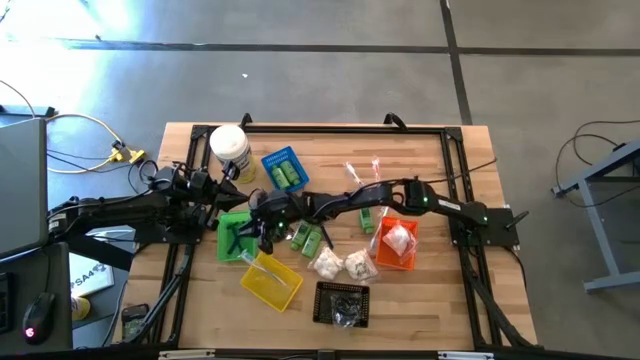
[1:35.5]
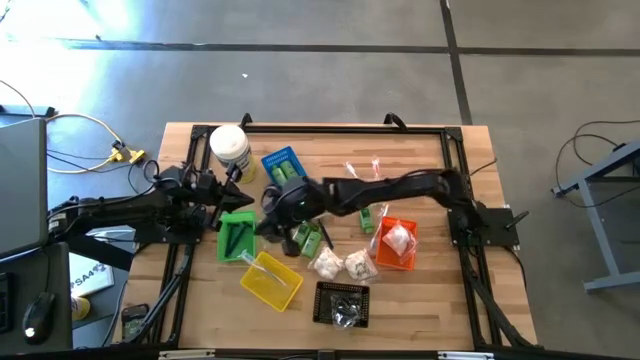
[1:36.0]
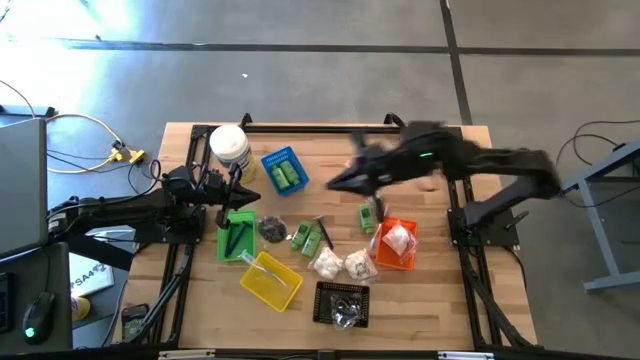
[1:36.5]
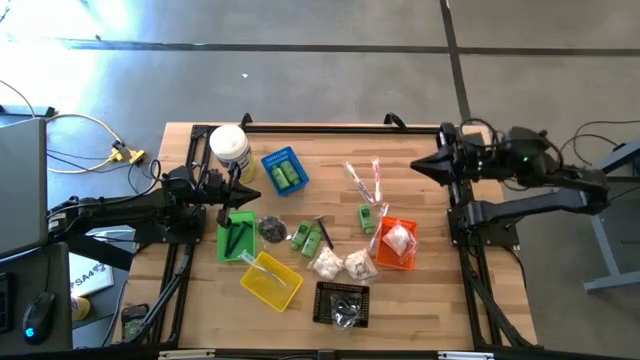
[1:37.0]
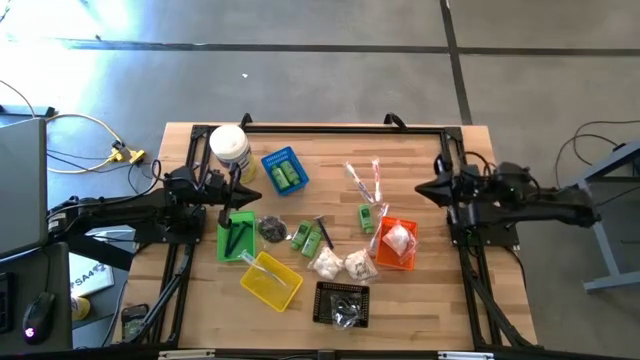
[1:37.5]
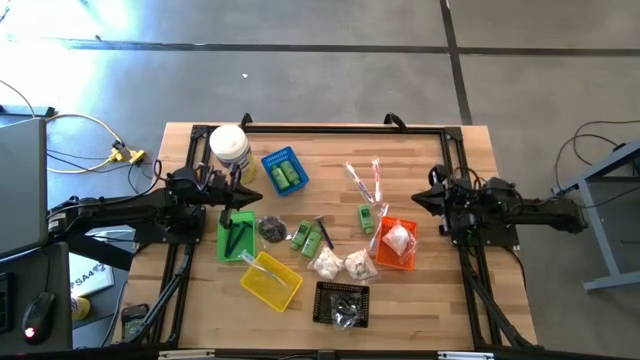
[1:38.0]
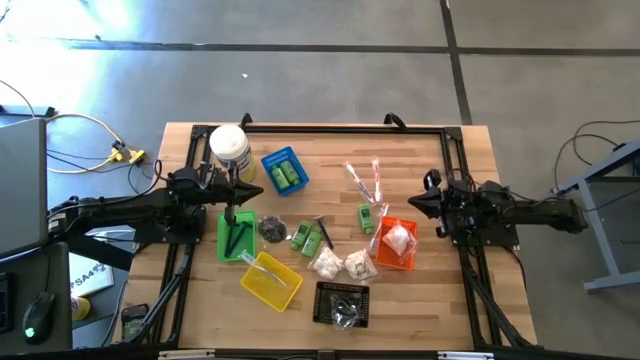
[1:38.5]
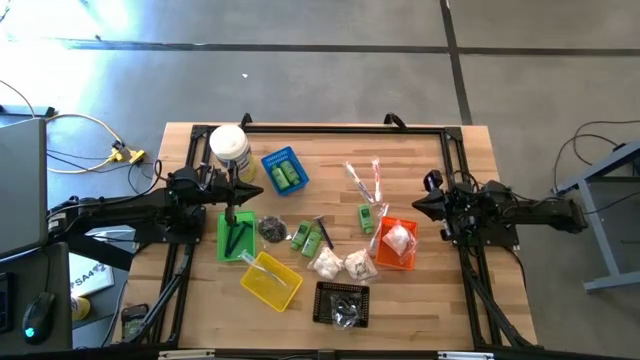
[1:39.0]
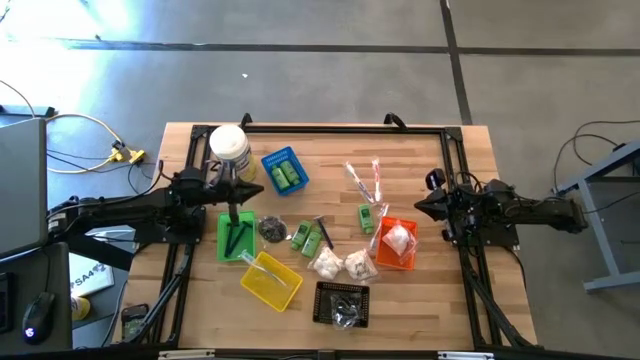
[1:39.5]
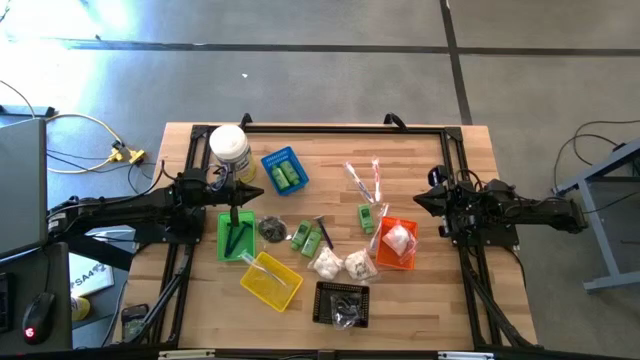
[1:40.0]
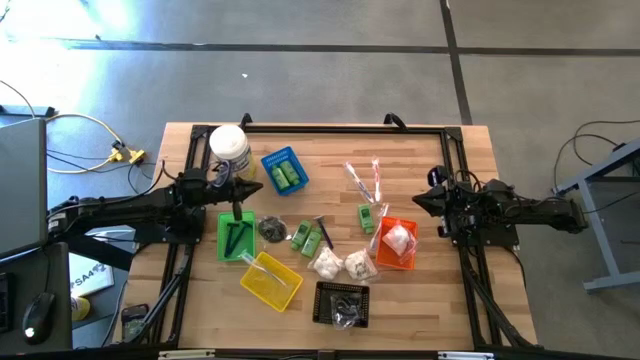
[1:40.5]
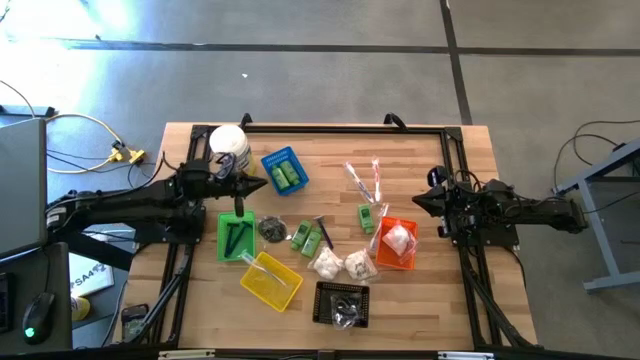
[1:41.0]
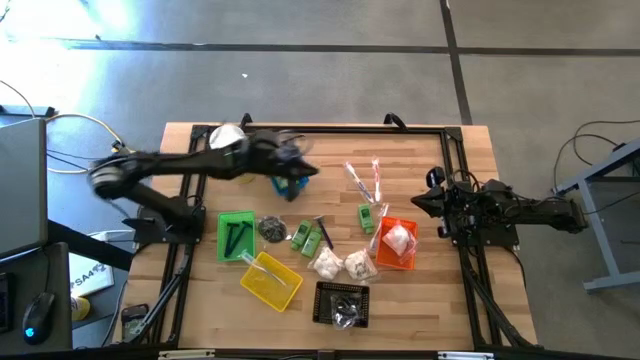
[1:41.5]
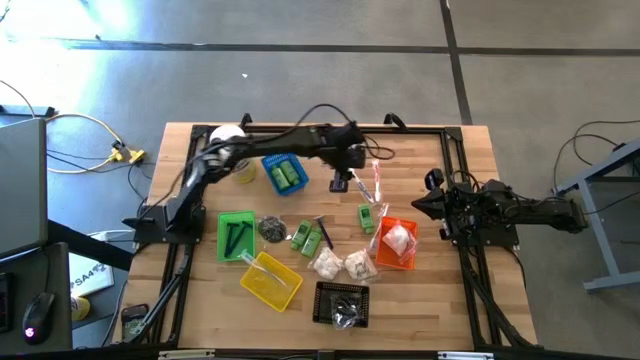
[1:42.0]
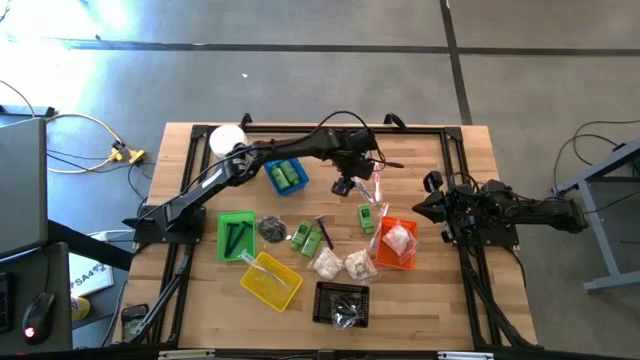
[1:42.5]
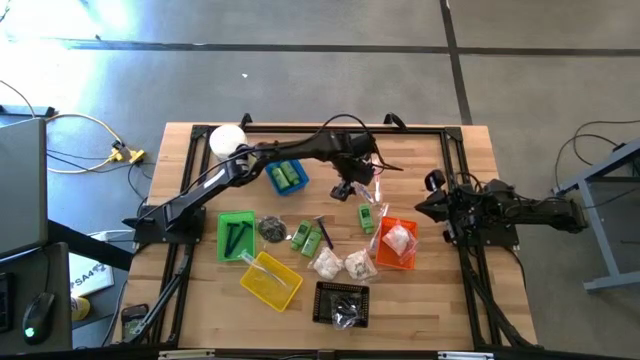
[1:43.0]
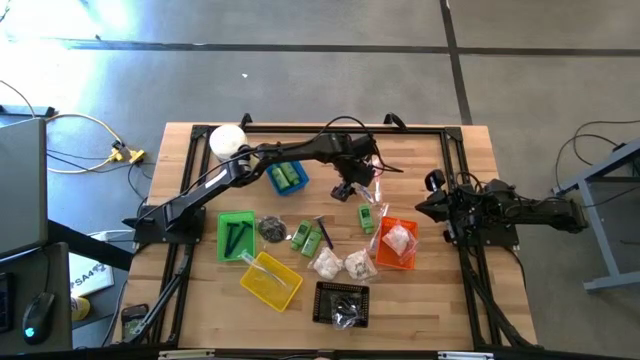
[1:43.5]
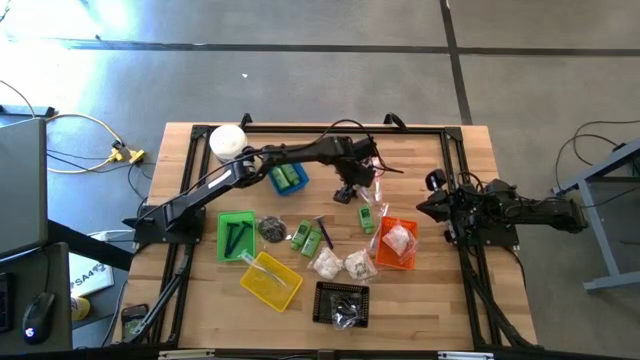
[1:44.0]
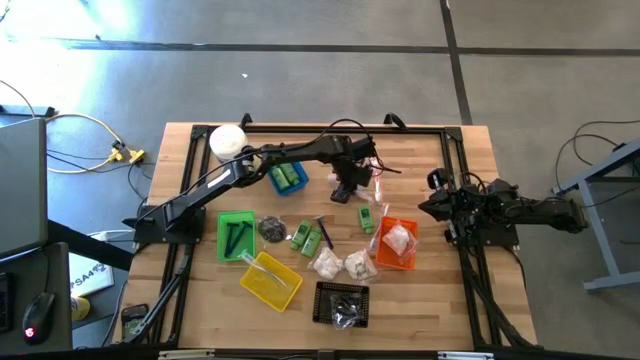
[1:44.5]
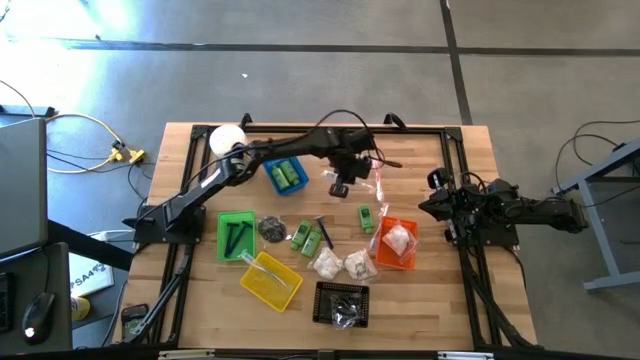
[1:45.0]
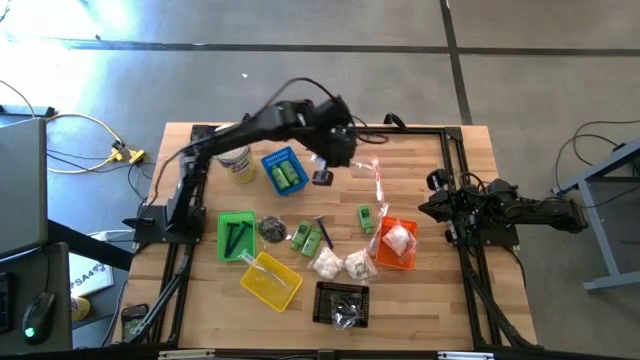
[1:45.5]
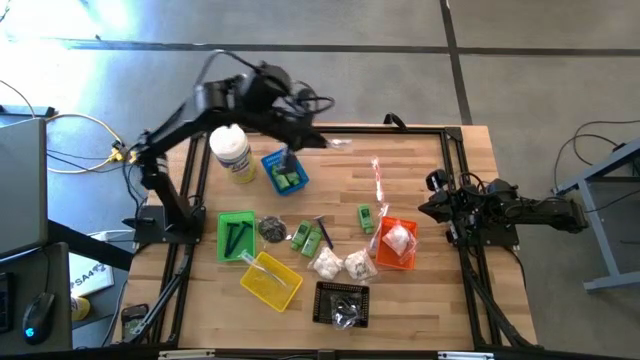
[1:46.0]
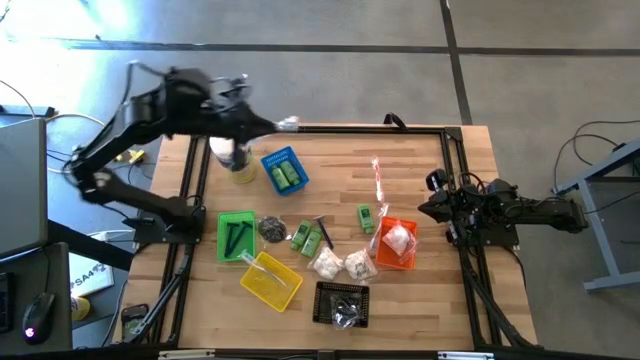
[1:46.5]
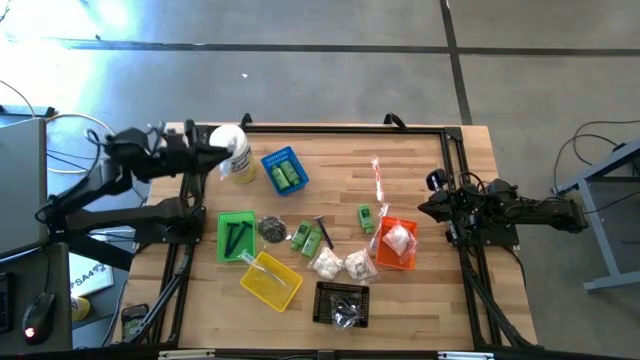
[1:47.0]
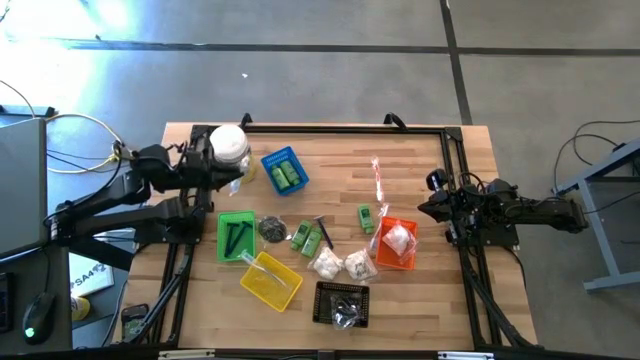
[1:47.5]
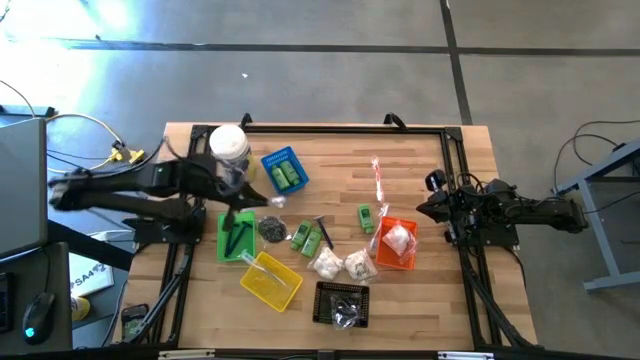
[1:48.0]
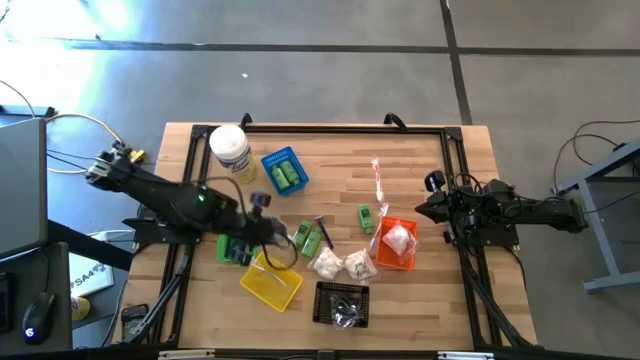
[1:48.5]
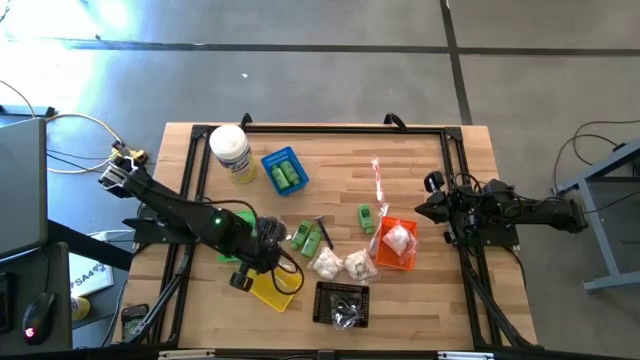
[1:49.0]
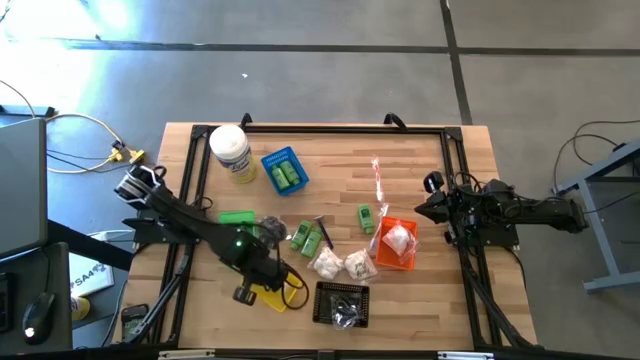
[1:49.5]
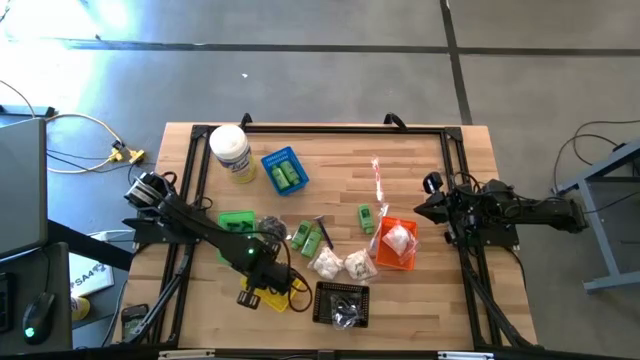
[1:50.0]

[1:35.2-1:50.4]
Task: Pick & Place Travel size toiletries
Put the blue toothbrush into the yellow bin

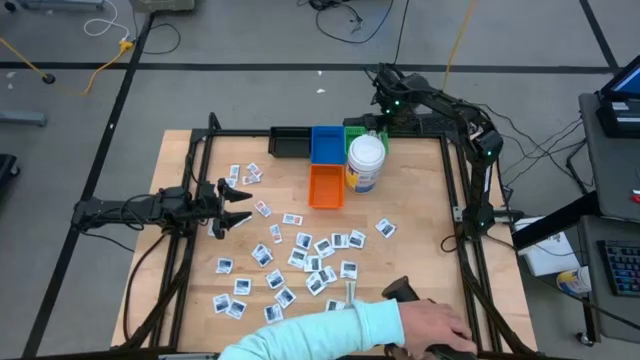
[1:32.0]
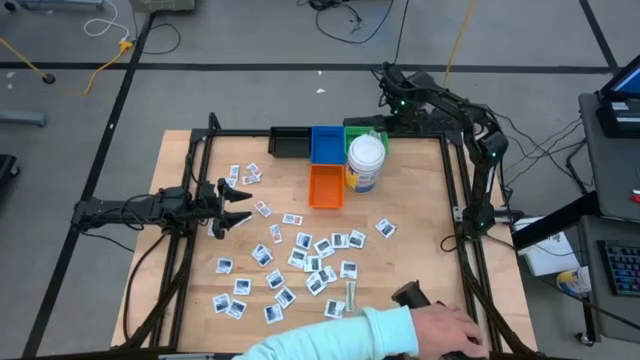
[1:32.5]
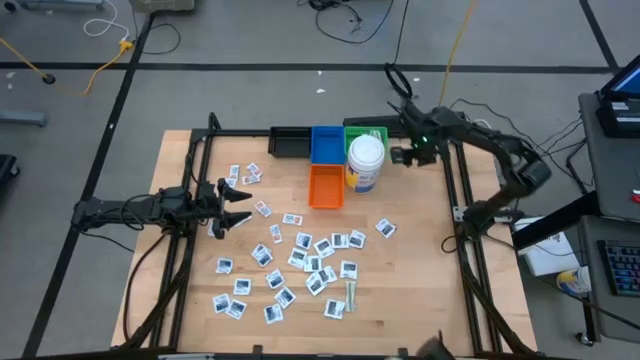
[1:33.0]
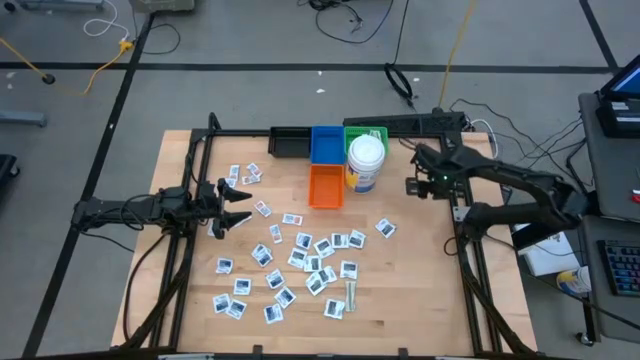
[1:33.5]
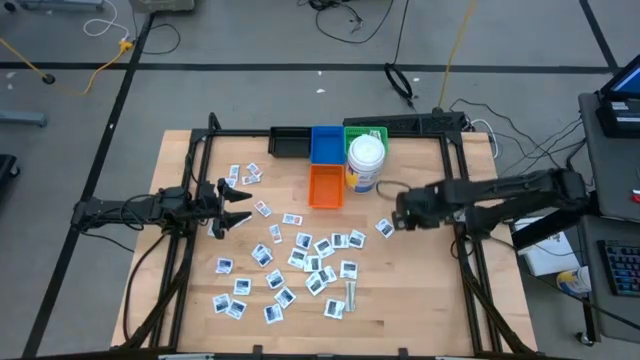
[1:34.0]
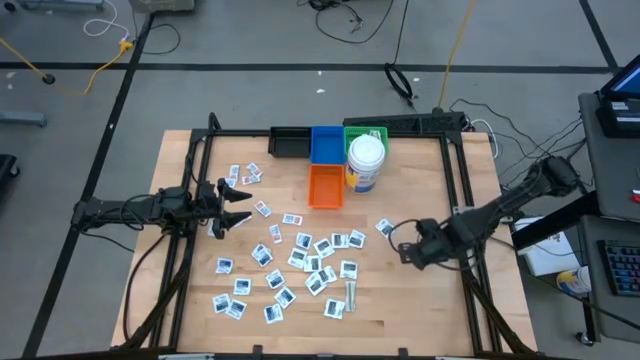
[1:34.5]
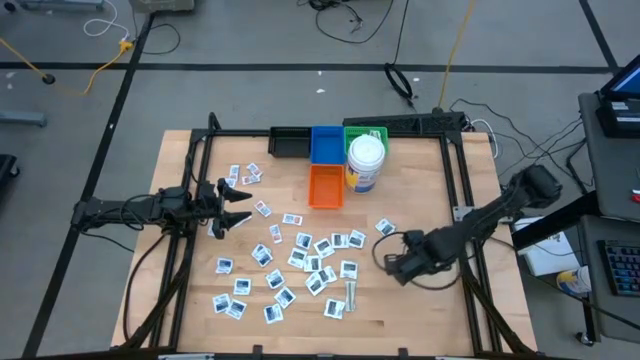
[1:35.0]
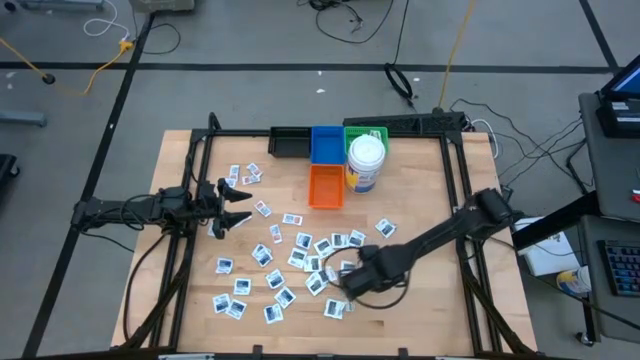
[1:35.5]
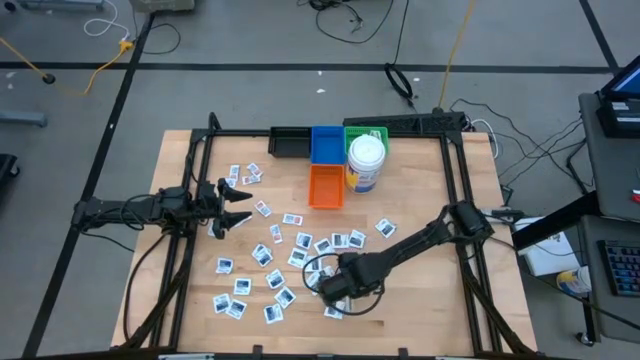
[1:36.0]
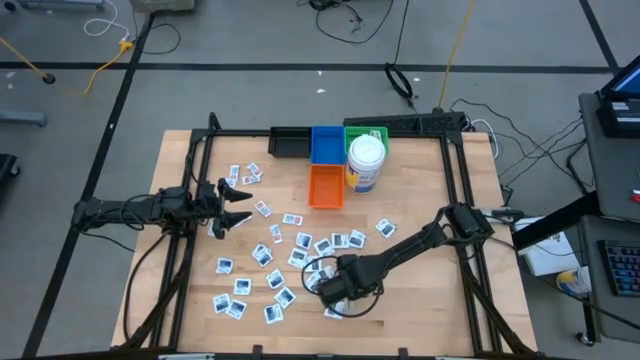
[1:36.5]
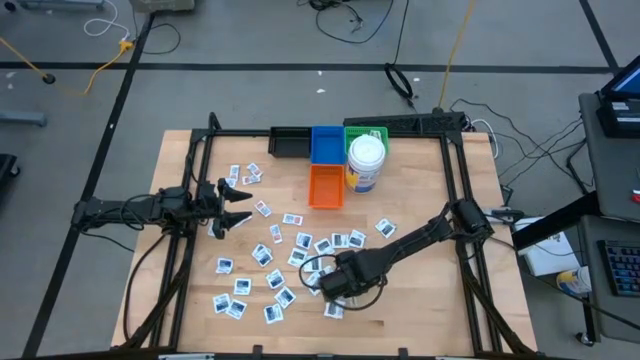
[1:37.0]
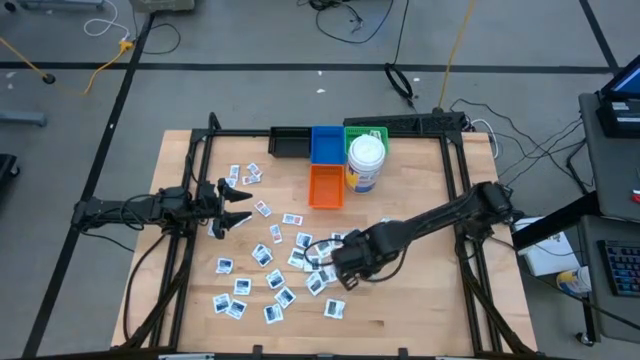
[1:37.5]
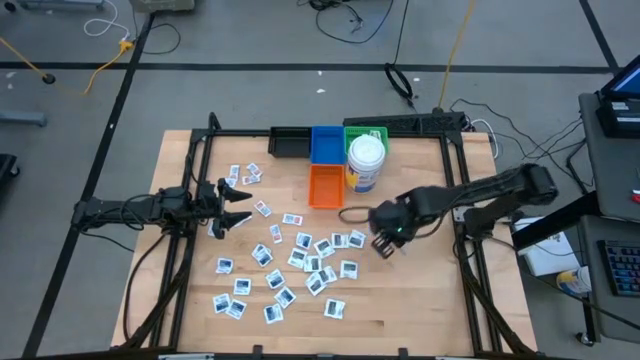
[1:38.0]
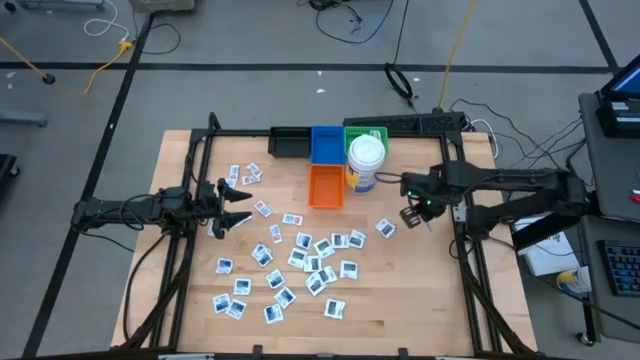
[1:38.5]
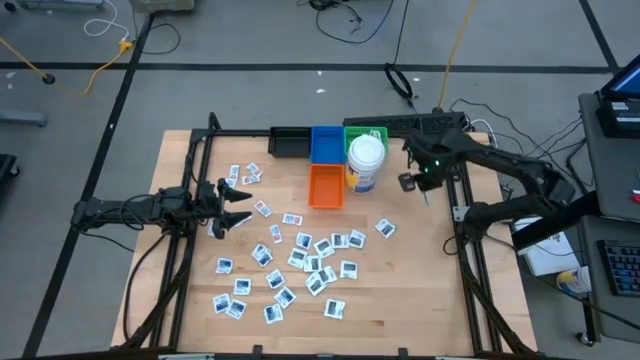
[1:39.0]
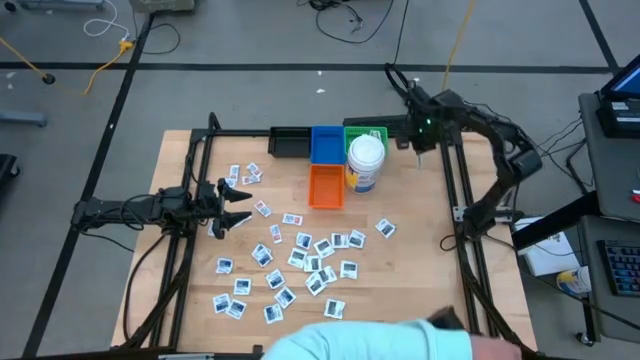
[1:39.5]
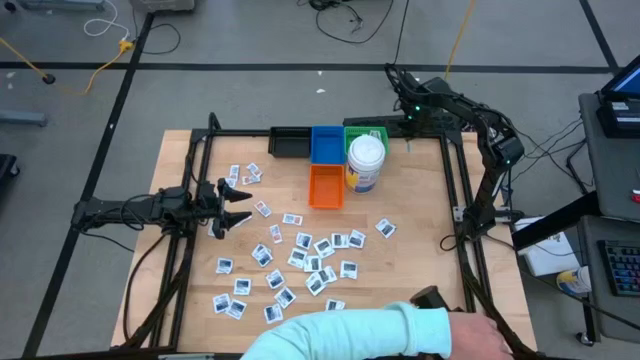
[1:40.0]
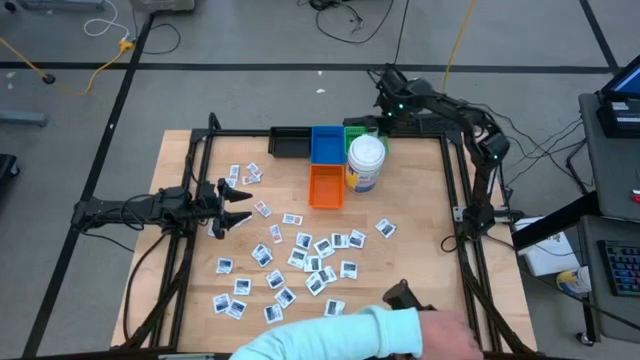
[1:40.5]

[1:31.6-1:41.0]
Task: Pick & Place First Aid Supplies
Put the green bandage pack into the green bin
